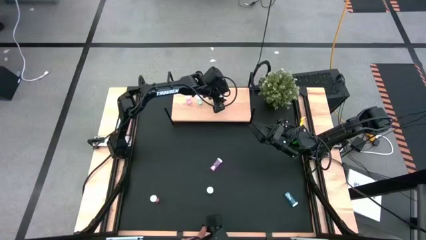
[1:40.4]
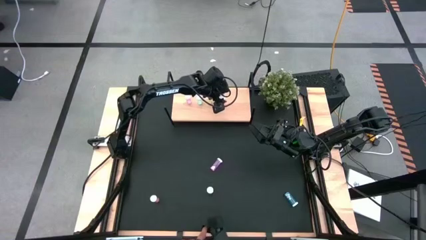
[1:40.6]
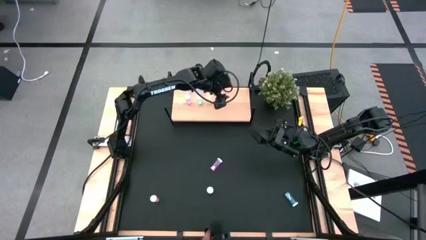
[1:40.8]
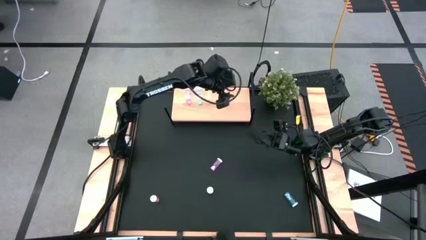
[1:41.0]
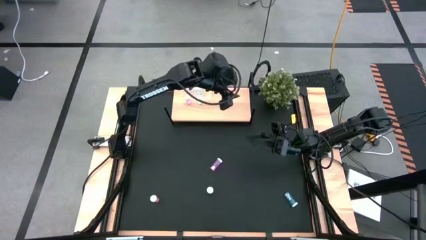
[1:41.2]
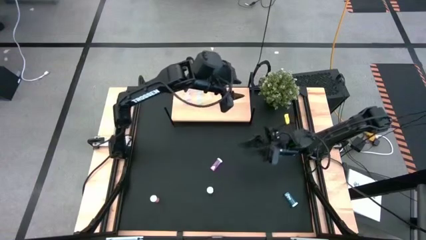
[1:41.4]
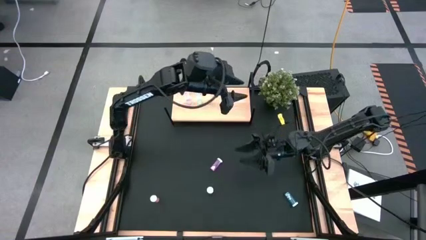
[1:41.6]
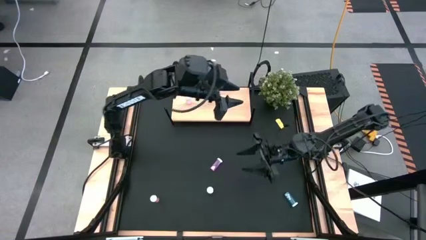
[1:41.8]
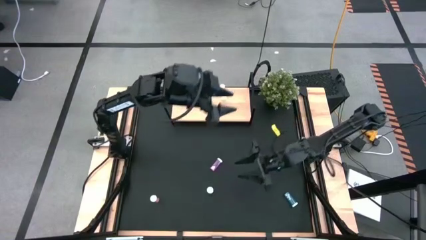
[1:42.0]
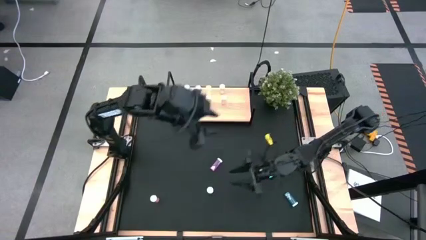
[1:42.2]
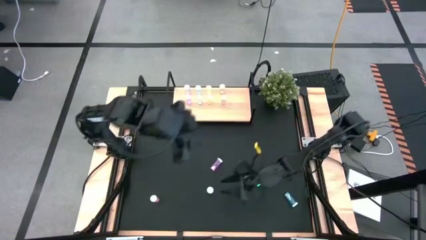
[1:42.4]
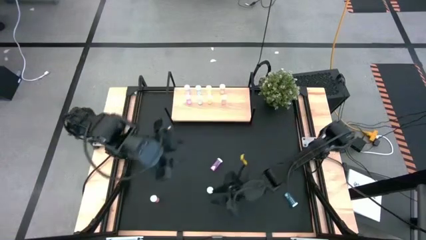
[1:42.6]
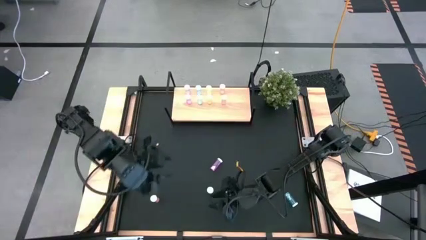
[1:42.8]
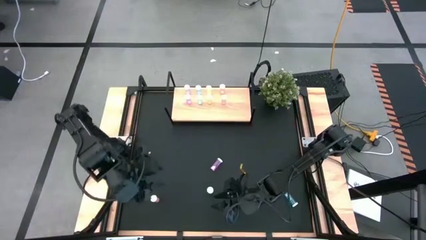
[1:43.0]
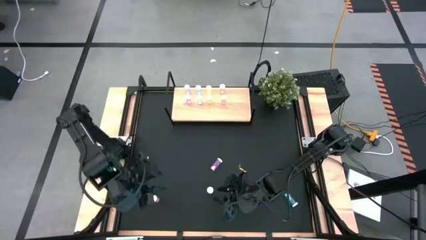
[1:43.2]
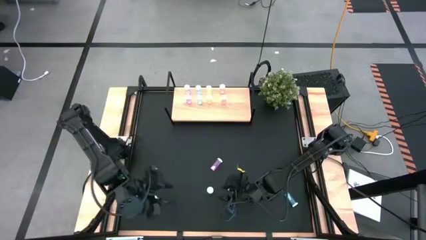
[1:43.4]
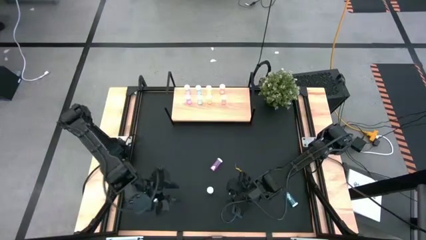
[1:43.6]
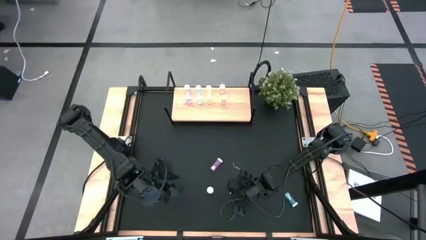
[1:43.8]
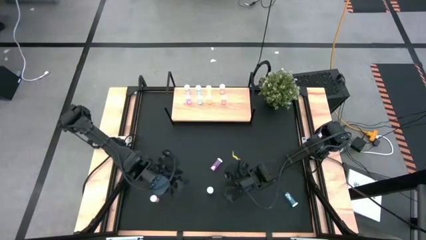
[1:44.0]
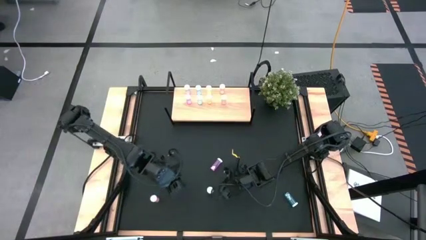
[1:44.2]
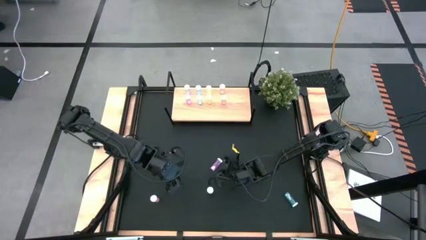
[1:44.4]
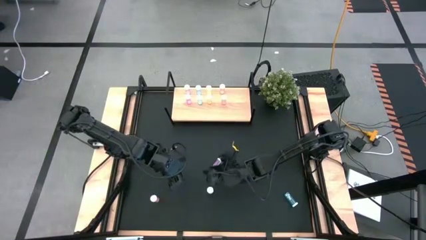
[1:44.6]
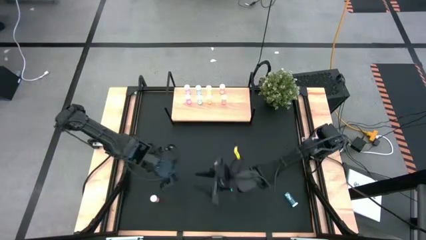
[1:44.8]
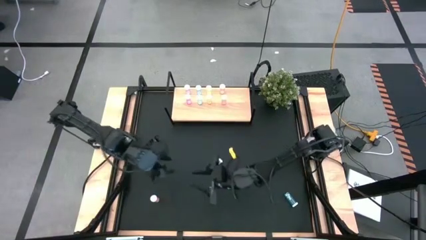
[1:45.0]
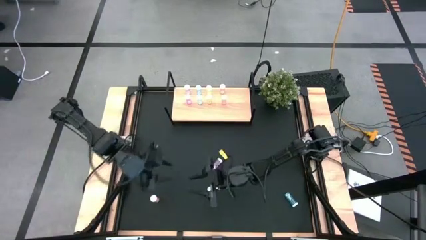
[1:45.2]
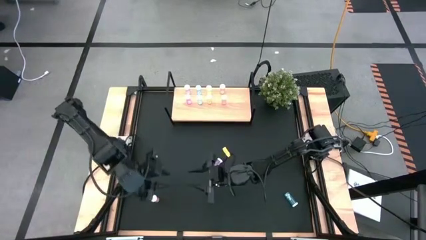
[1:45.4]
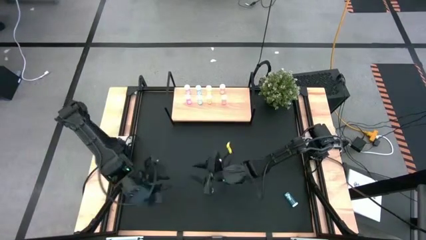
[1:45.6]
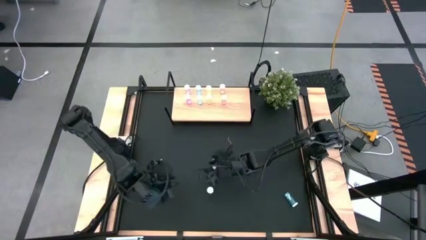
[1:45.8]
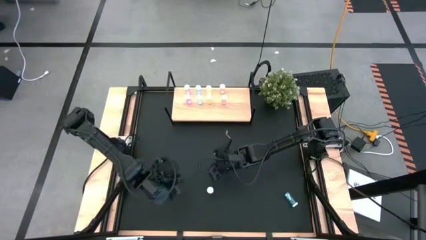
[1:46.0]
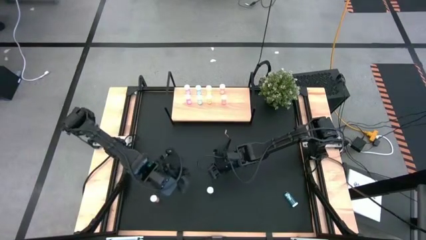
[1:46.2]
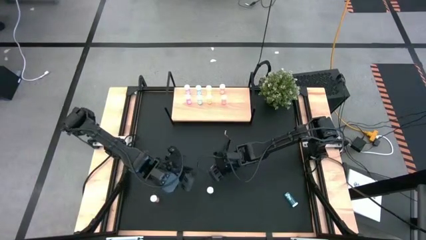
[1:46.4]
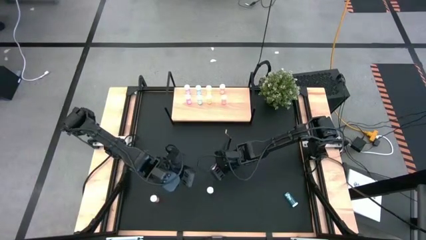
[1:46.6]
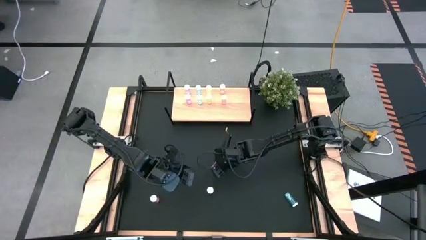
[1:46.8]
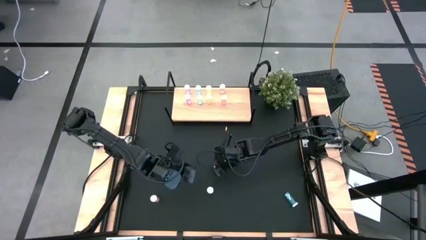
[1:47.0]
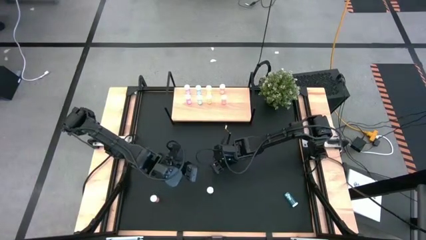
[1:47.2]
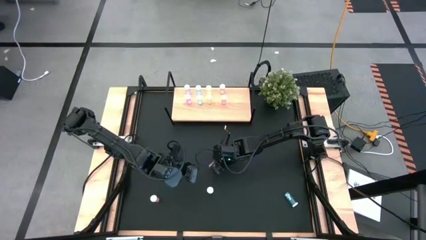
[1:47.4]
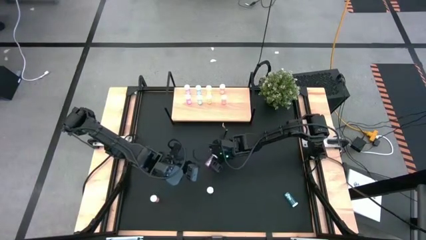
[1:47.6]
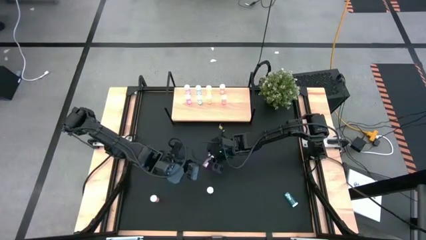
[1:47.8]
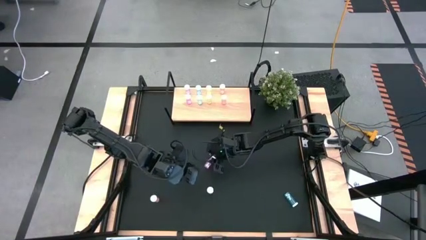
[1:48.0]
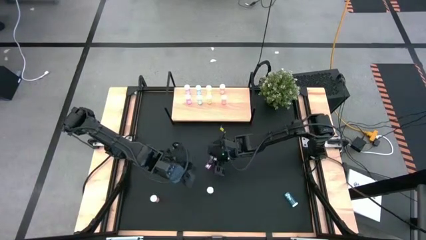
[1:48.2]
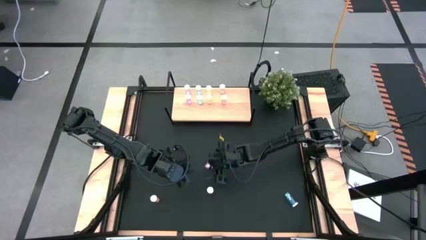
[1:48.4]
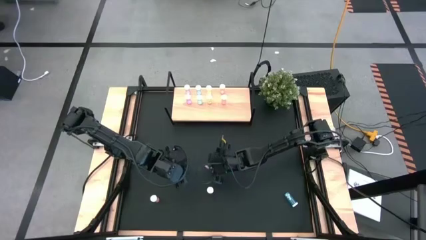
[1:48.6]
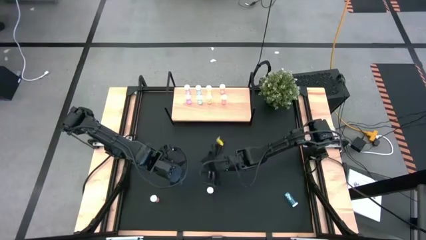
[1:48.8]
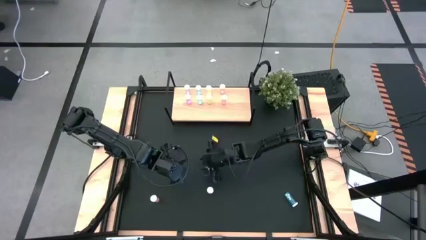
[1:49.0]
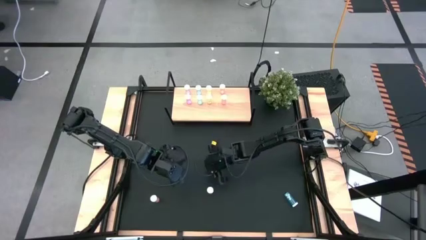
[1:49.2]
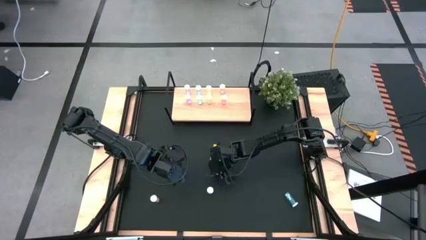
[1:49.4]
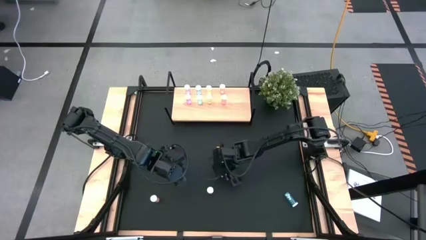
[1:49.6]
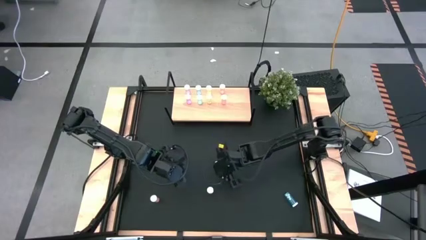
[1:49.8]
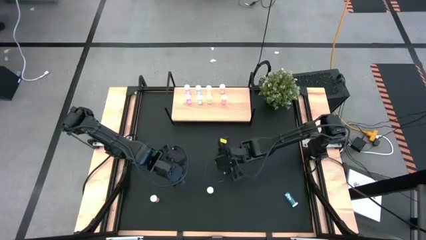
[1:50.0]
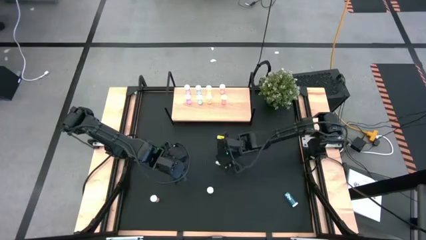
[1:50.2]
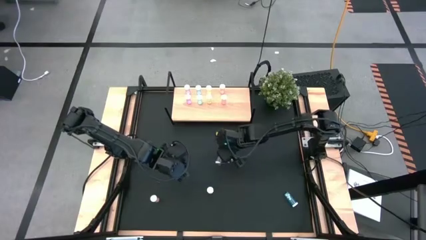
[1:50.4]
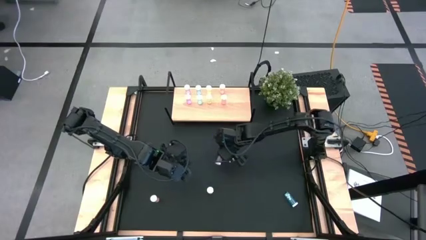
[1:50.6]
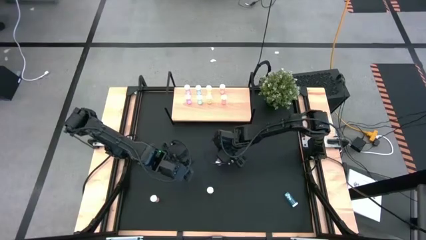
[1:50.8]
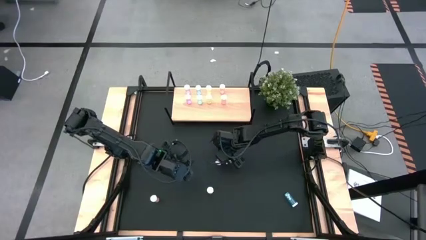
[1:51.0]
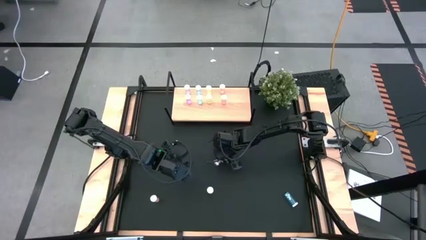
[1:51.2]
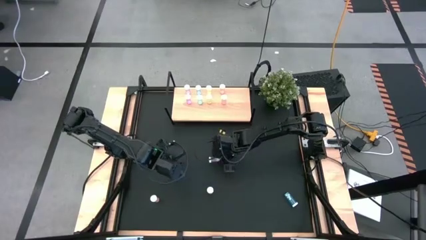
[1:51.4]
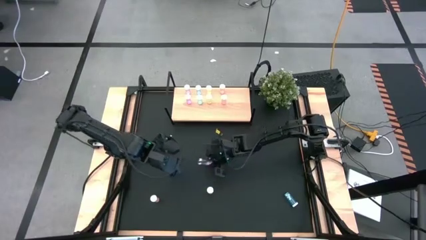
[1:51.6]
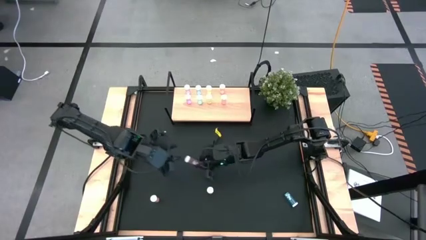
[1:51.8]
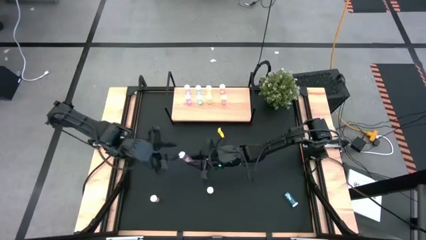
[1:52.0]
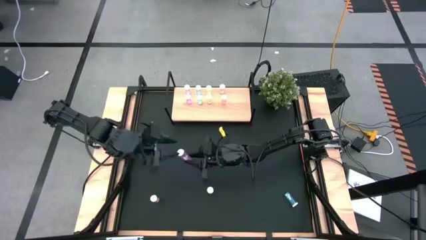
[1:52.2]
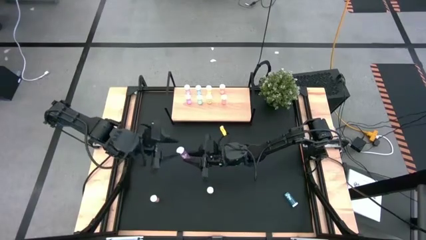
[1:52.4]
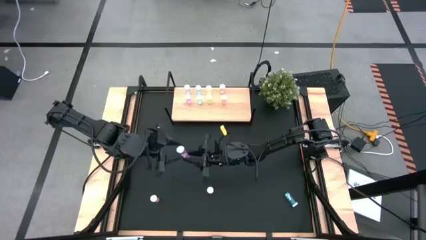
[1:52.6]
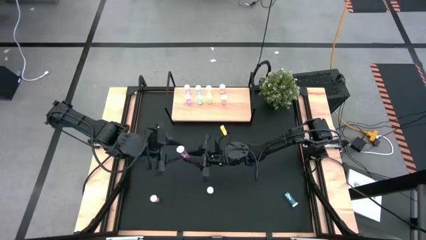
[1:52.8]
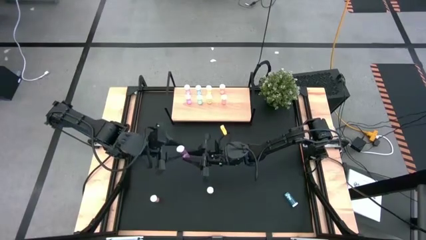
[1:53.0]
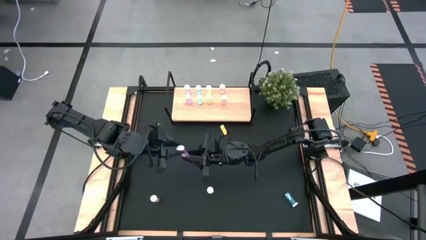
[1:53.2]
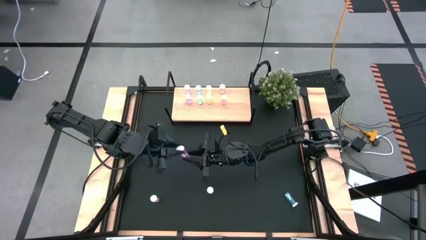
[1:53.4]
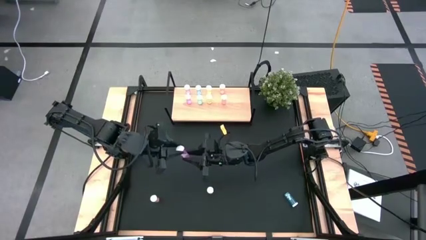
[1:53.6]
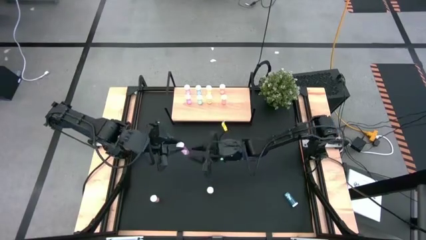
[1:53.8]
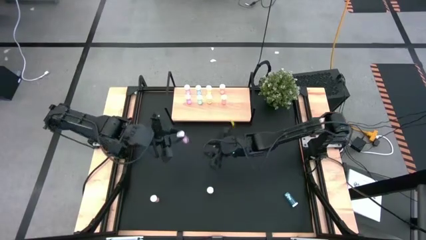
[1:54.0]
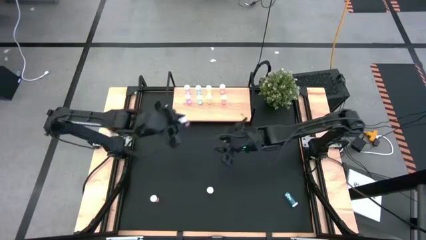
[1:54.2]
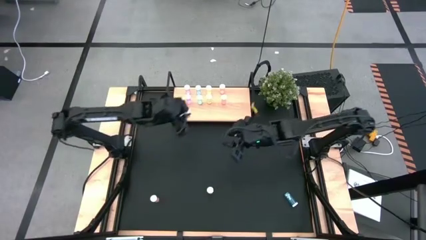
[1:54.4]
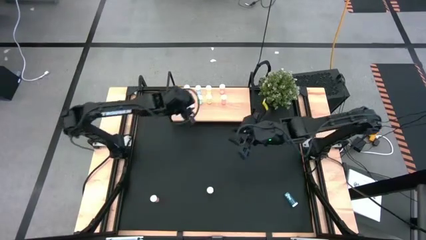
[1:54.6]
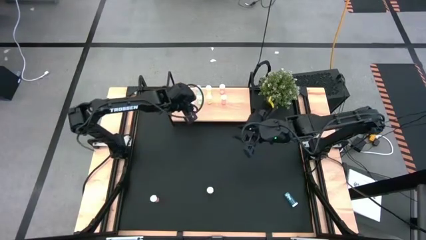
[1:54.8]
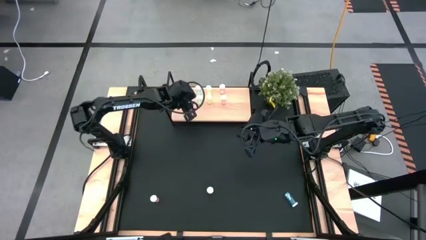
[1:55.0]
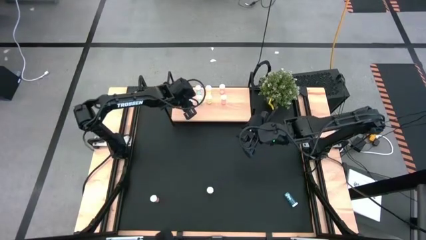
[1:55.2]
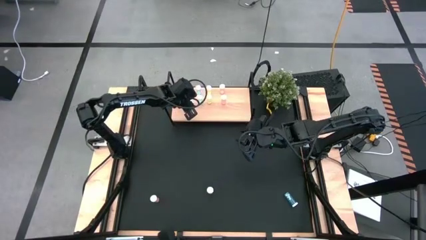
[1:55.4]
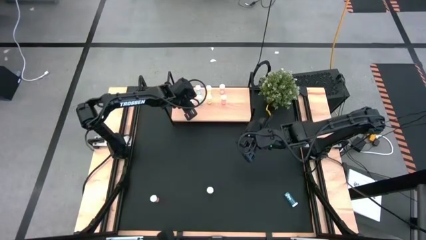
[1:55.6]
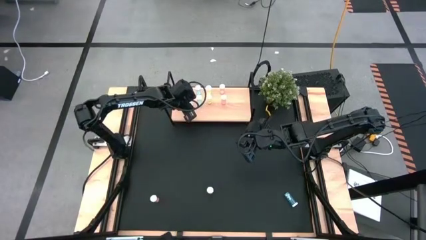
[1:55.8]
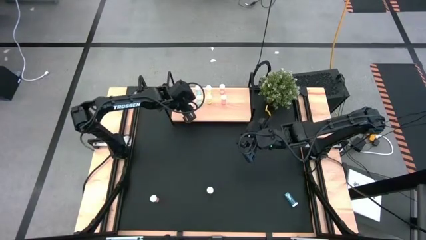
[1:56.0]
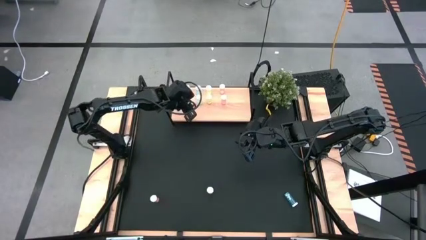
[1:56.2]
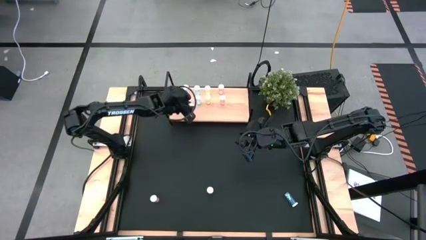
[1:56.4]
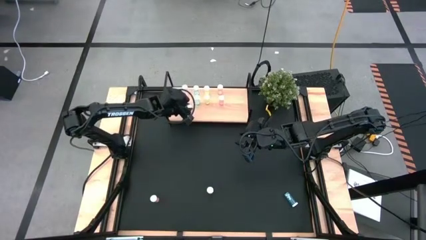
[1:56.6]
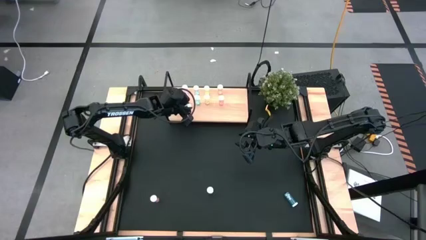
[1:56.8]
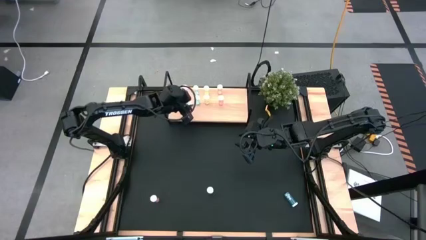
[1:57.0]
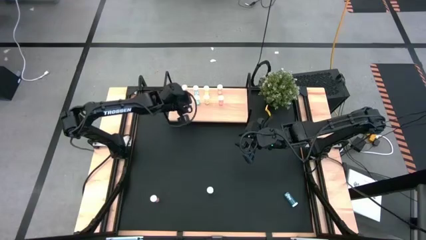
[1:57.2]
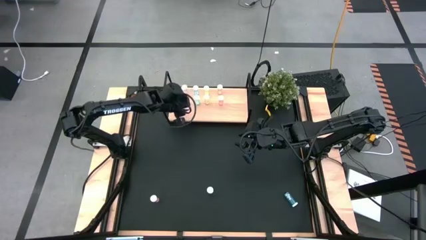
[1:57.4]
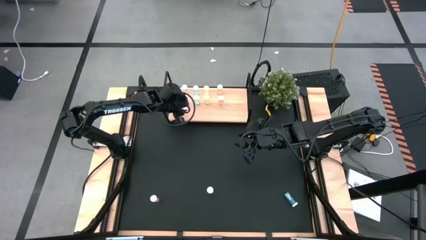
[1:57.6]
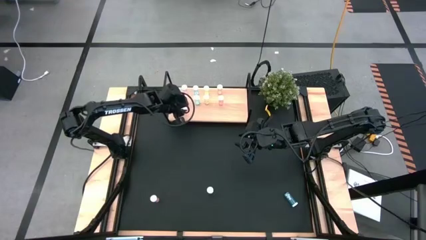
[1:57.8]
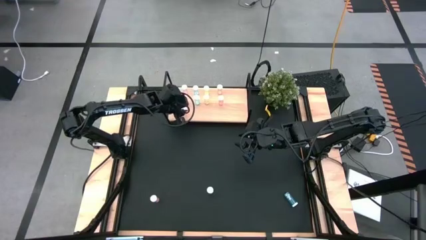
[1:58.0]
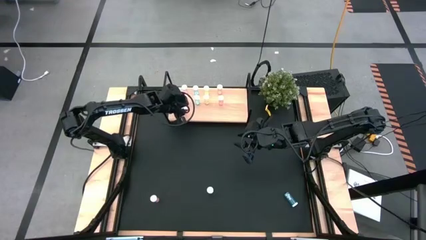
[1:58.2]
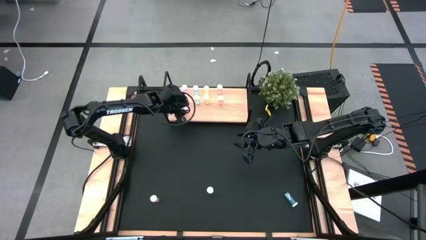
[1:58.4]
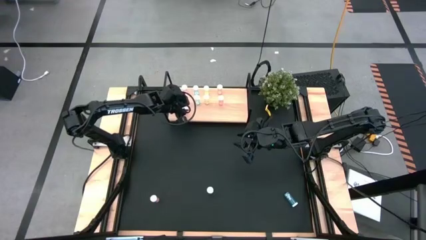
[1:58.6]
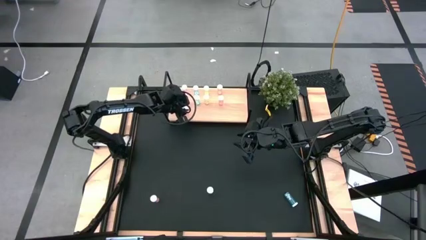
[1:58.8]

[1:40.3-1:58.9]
Task: Pick and place medicine bottles onto shelf by color
Put the pink medicine bottle on the shelf aligned with the other pink medicine bottle
